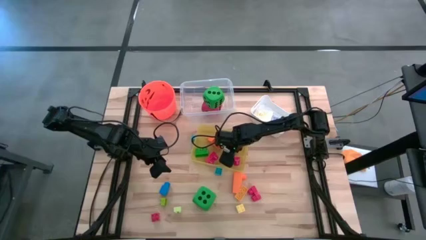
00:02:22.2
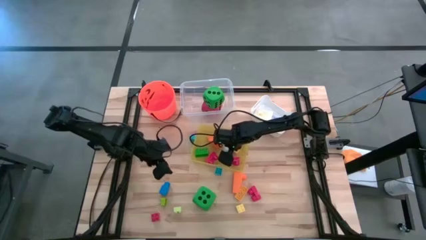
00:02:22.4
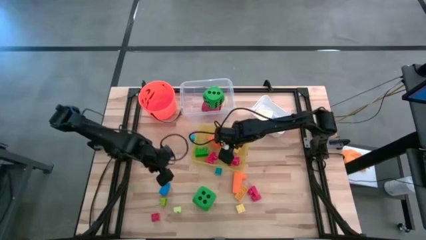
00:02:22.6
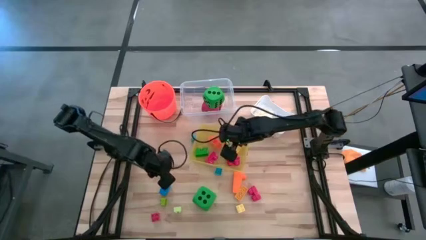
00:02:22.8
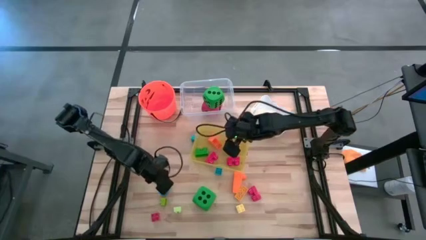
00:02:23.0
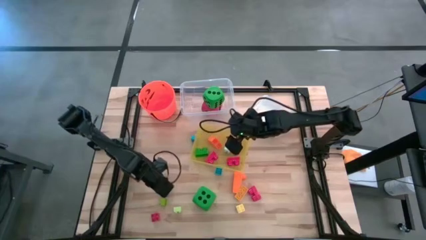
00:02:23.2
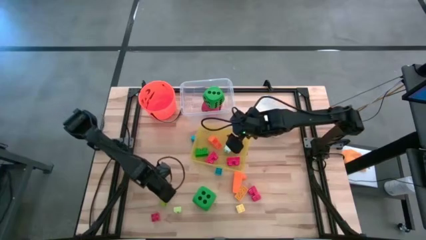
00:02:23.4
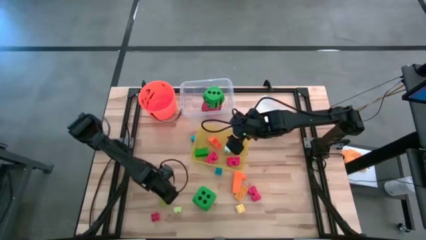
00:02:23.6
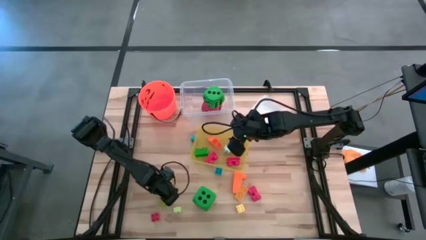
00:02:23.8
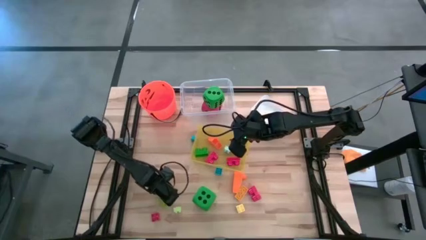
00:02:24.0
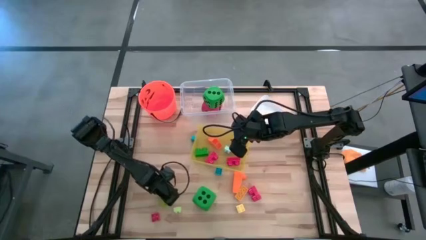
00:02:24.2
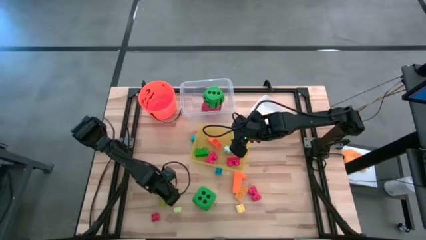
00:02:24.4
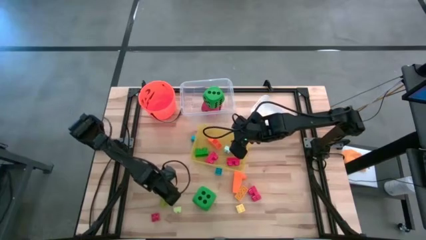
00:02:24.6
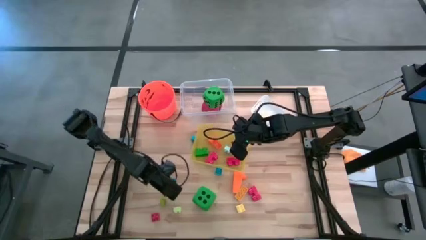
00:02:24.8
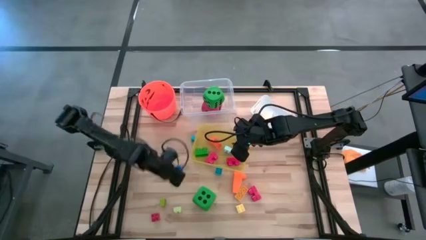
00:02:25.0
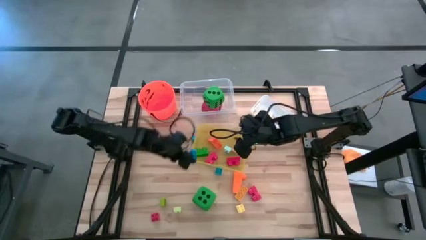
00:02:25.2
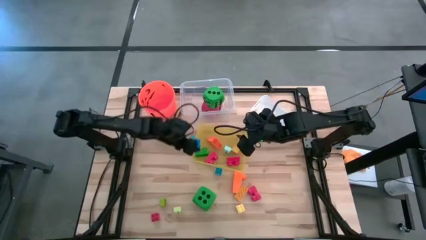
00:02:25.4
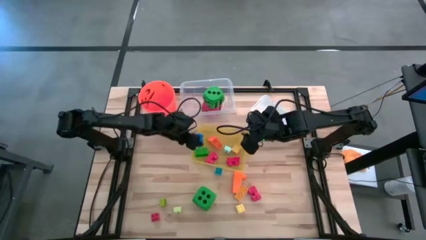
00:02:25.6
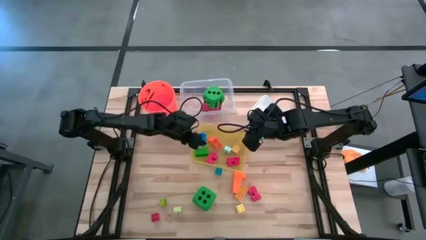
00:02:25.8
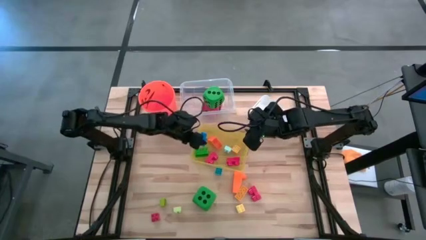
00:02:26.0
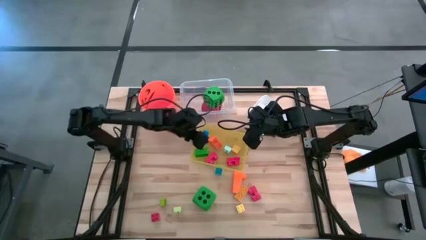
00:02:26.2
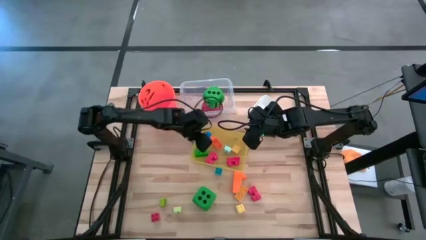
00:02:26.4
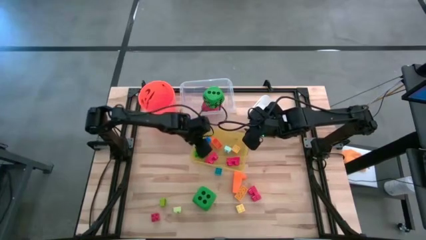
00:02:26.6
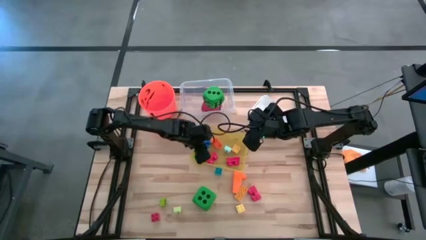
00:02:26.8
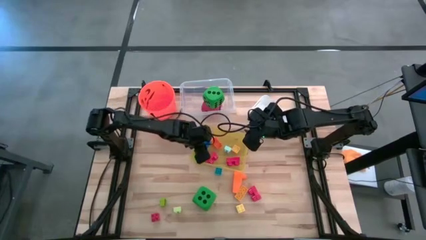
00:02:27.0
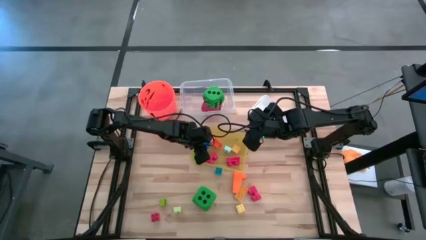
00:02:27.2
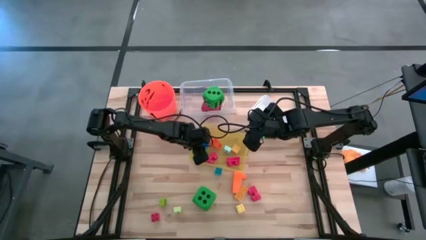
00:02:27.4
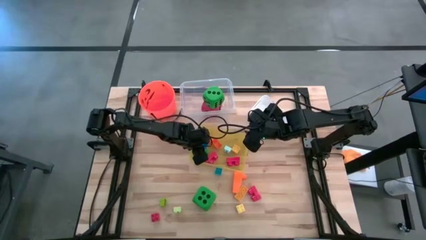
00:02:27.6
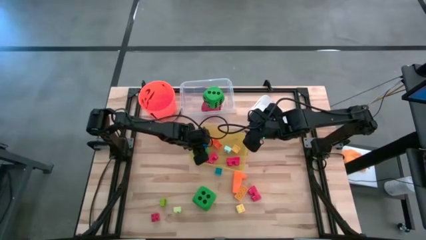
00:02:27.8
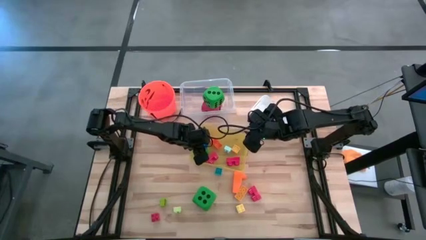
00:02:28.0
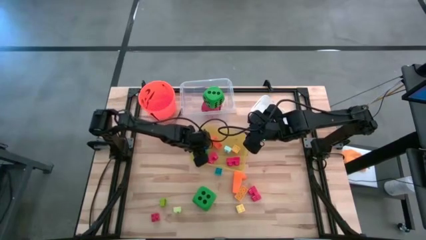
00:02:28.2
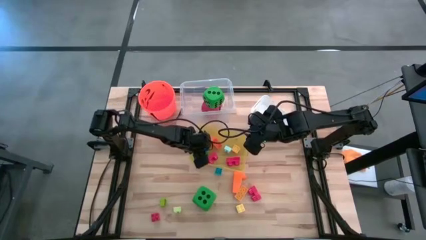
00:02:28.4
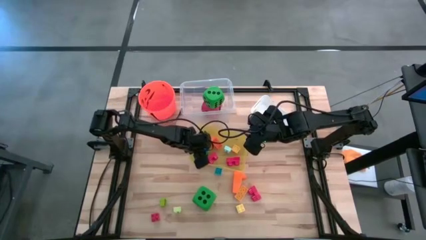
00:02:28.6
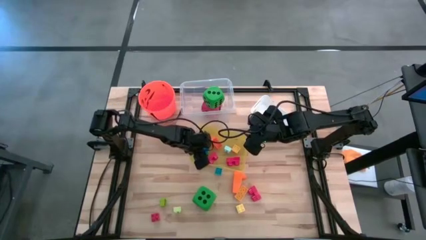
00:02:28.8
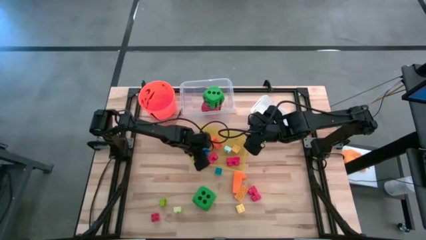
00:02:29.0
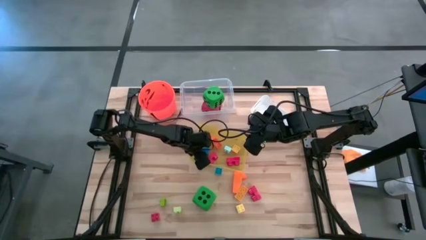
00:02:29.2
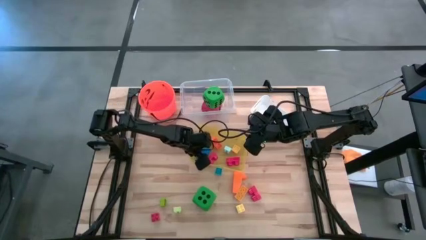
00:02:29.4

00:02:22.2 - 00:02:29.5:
Task: Pick & Place Toys
Put the blue game piece into the yellow bin

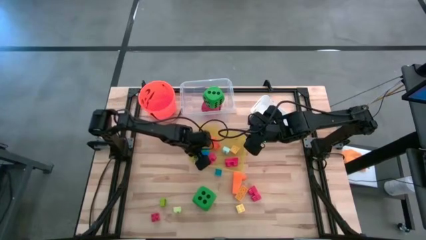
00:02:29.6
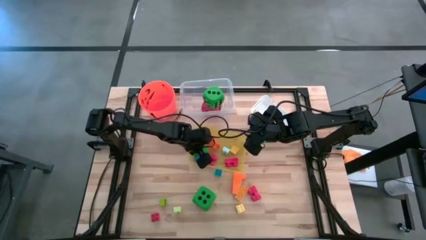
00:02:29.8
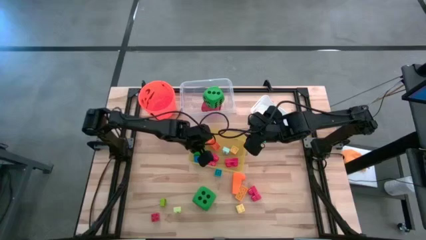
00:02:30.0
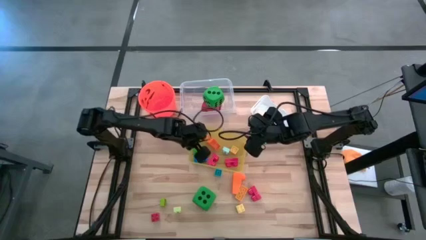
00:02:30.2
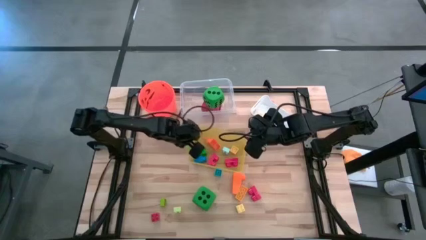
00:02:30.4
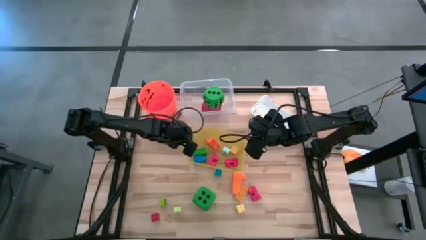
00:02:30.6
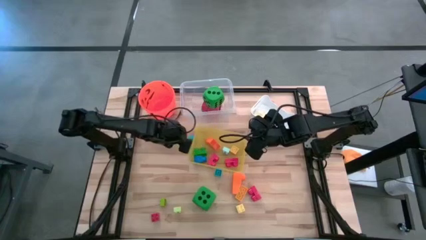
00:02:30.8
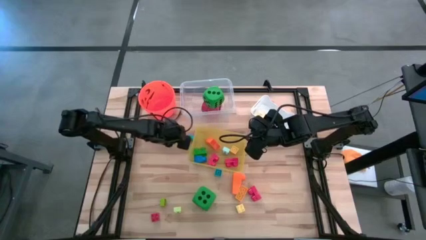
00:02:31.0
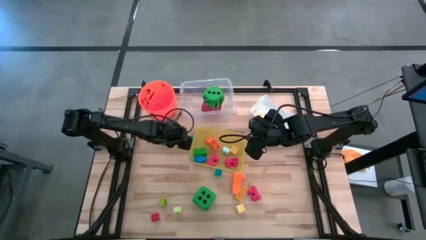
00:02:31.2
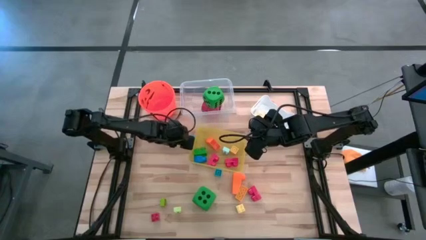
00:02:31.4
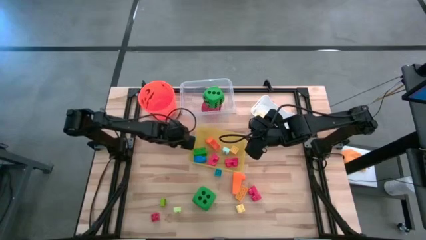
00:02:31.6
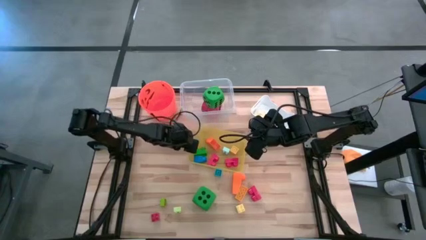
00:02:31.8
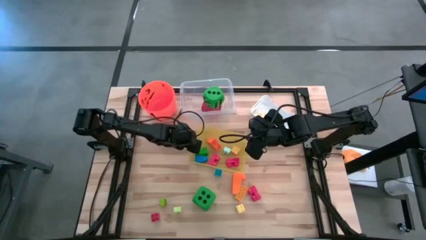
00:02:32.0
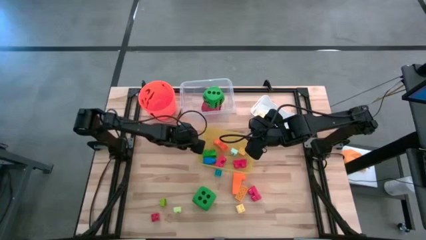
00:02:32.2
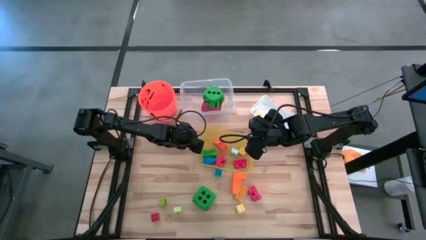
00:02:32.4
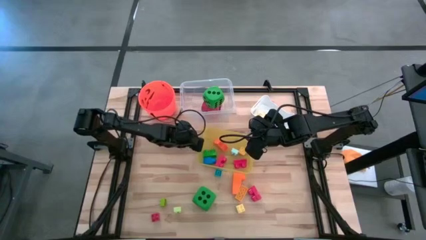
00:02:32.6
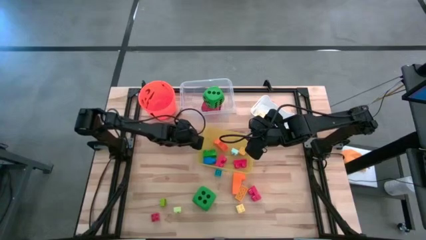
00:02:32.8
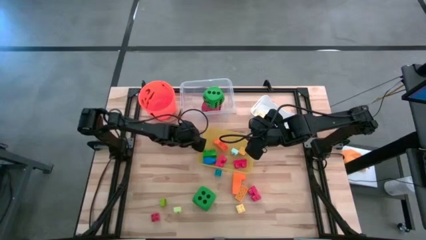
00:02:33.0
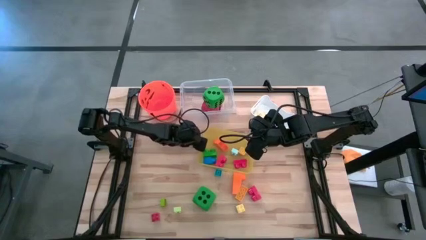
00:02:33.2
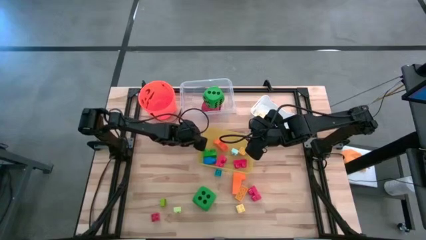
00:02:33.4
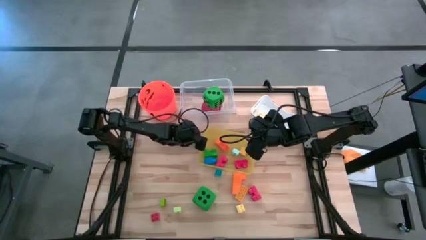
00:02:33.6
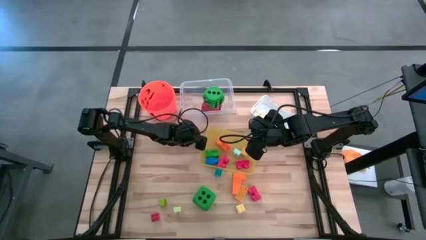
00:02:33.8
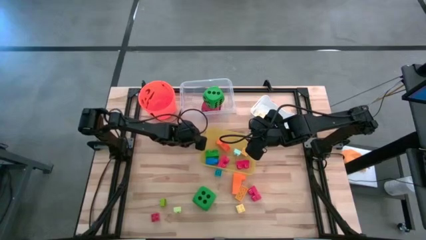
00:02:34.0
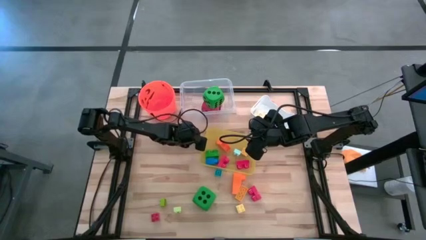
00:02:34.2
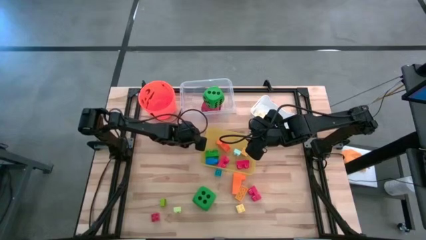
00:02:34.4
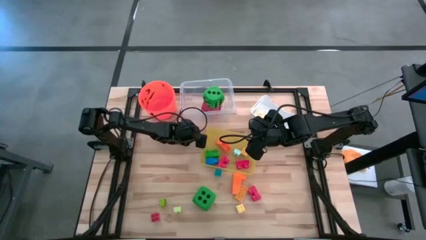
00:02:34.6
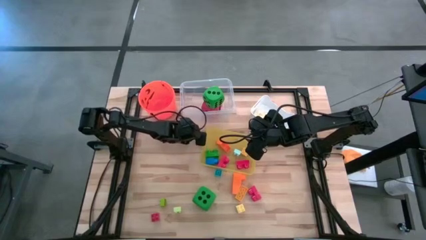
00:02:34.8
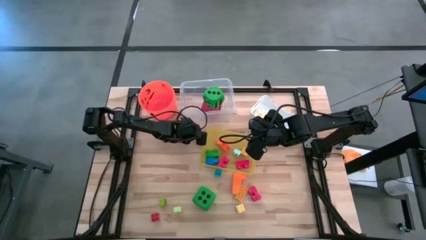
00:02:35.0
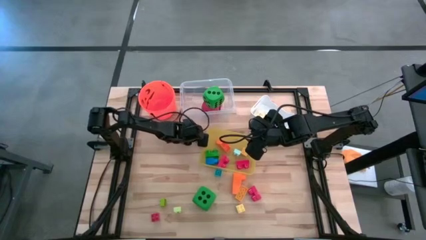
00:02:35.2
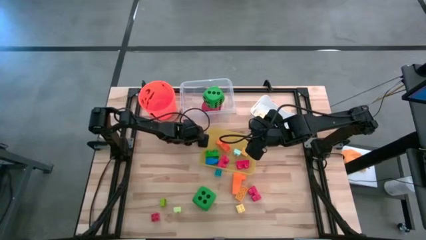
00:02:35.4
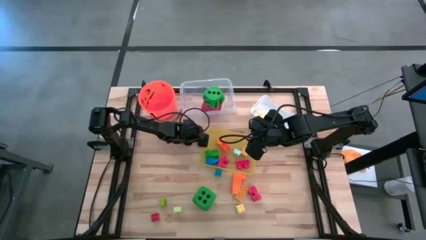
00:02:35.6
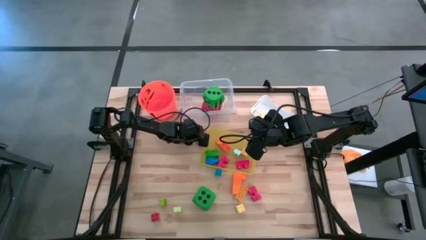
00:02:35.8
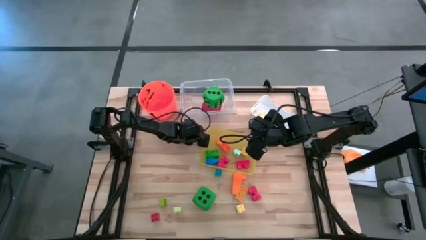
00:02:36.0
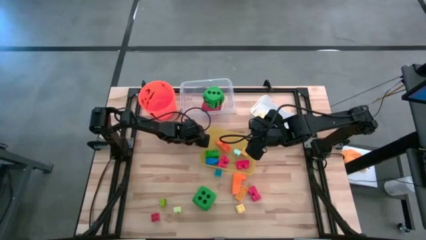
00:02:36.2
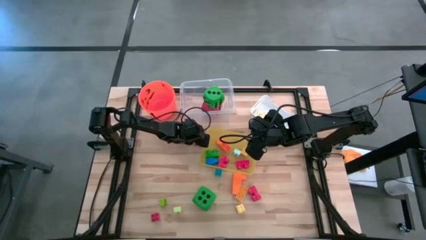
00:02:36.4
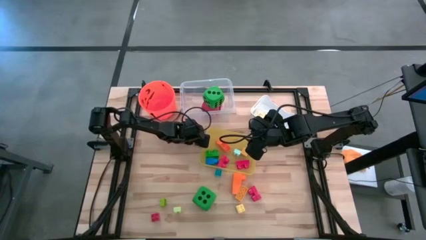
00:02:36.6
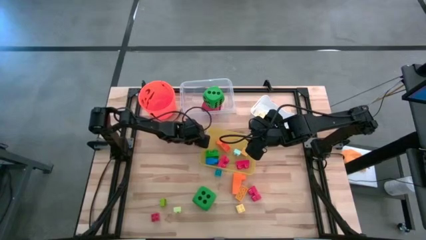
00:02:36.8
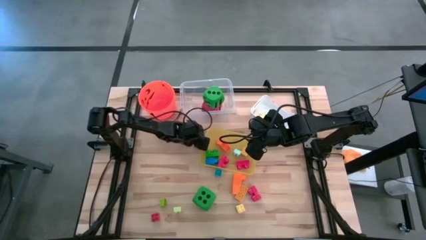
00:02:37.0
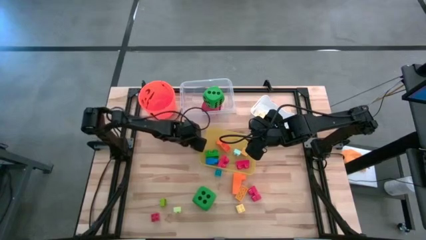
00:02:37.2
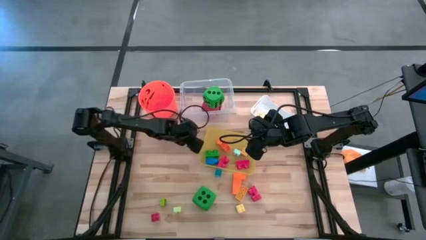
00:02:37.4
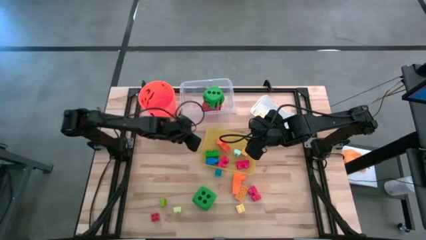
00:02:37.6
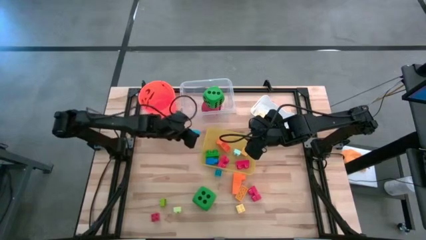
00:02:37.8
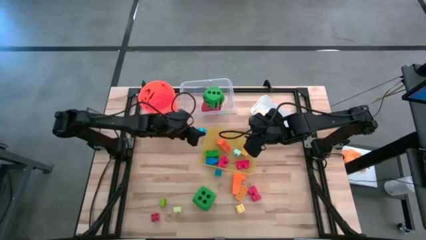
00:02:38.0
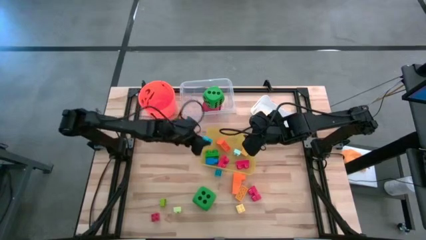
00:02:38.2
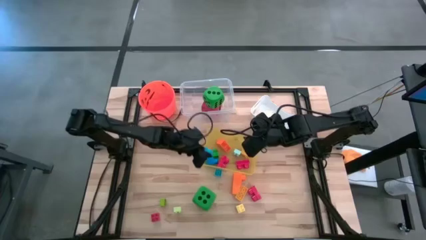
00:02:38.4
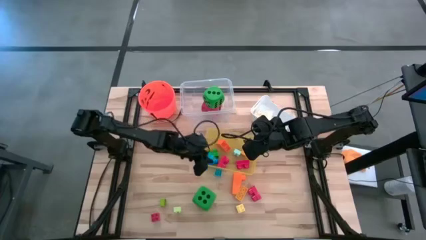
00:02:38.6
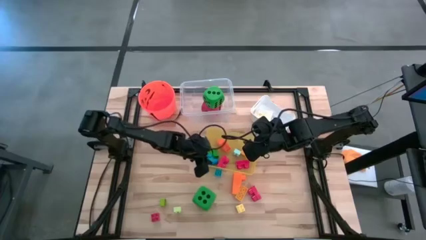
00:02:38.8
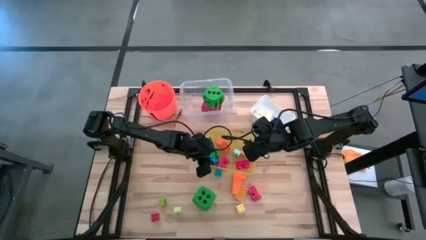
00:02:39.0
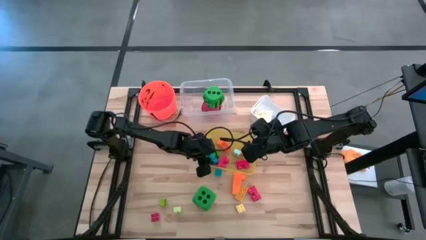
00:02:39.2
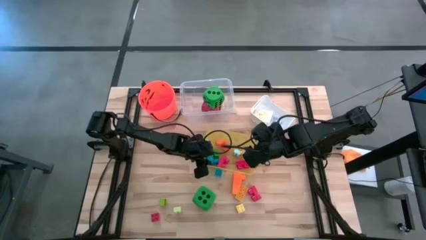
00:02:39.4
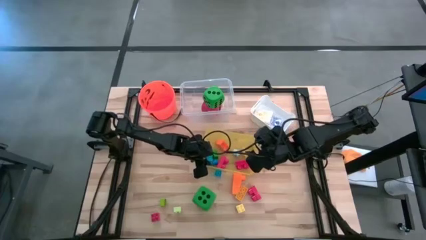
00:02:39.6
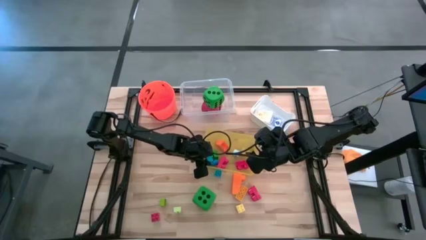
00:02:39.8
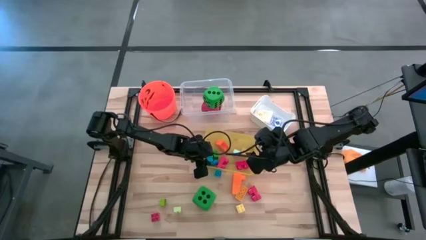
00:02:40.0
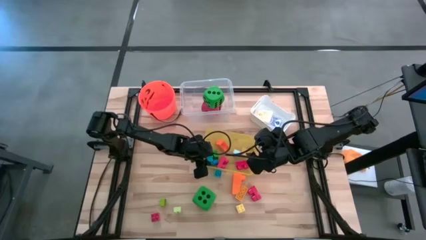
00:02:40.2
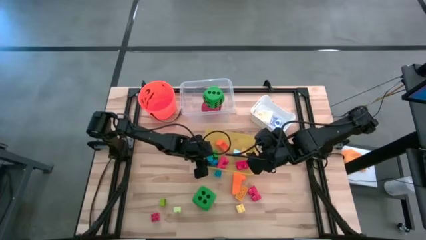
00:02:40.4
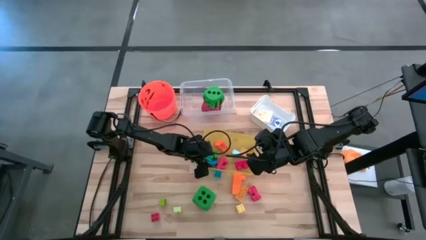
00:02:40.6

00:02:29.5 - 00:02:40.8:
Put the blue game piece into the yellow bin
